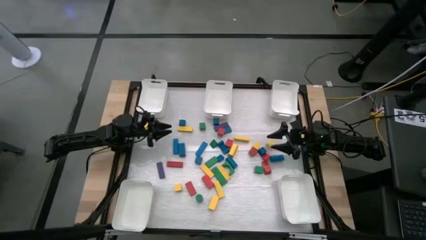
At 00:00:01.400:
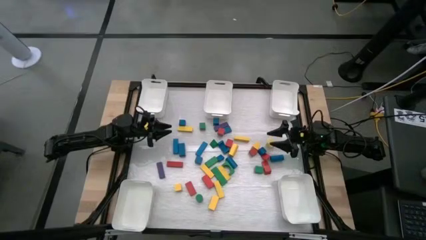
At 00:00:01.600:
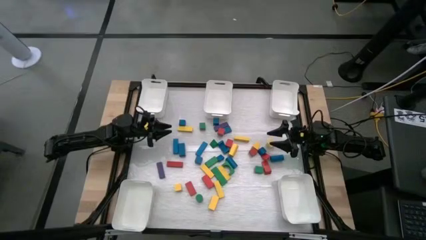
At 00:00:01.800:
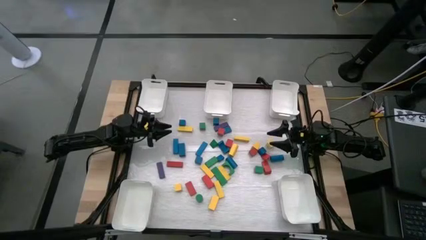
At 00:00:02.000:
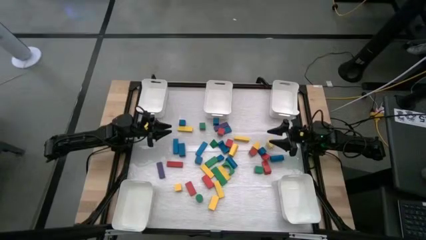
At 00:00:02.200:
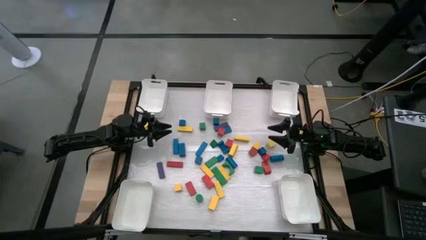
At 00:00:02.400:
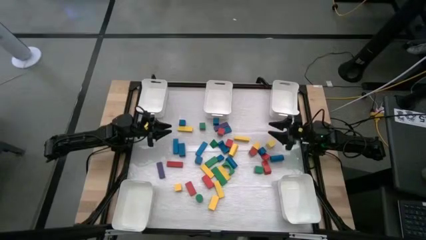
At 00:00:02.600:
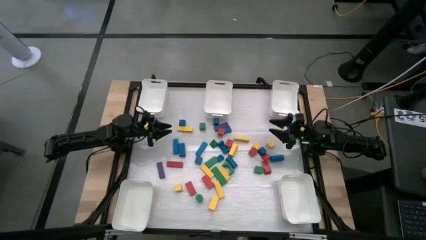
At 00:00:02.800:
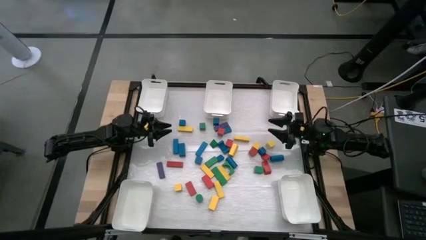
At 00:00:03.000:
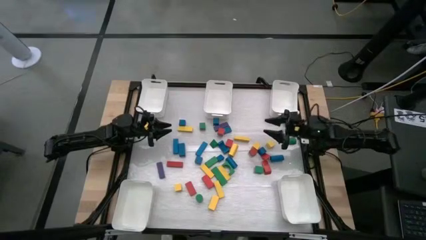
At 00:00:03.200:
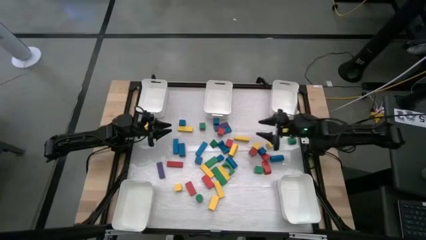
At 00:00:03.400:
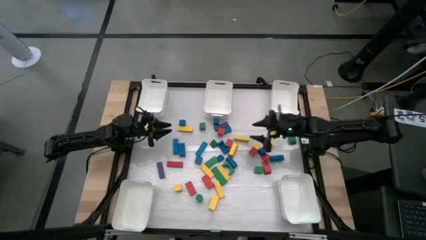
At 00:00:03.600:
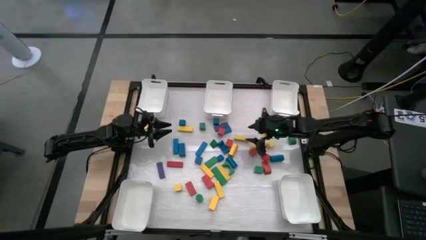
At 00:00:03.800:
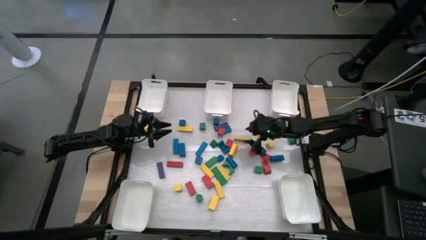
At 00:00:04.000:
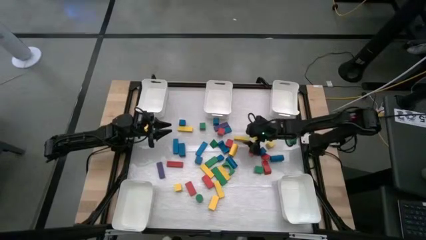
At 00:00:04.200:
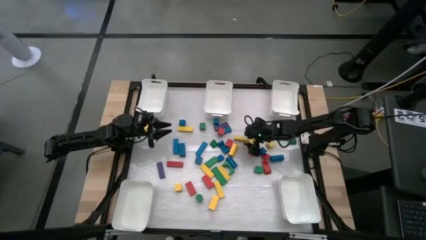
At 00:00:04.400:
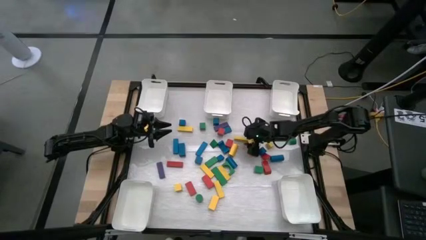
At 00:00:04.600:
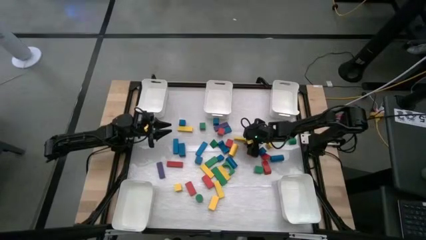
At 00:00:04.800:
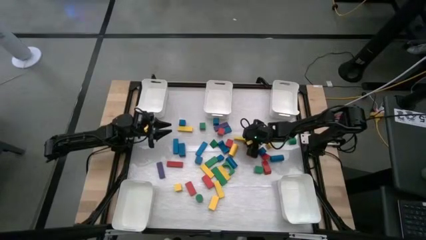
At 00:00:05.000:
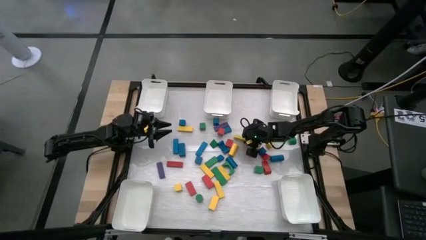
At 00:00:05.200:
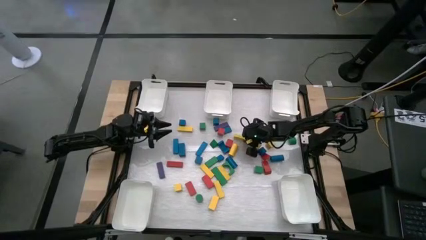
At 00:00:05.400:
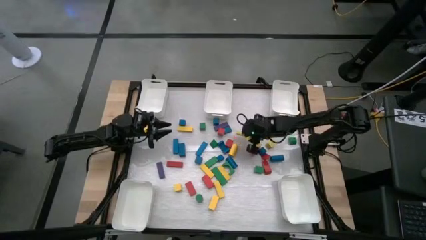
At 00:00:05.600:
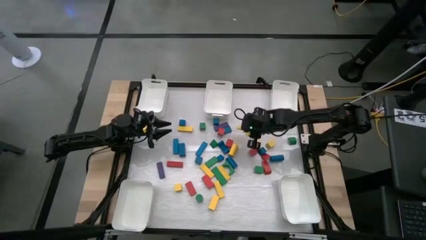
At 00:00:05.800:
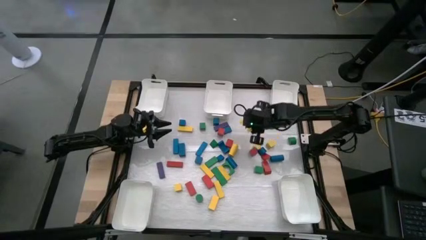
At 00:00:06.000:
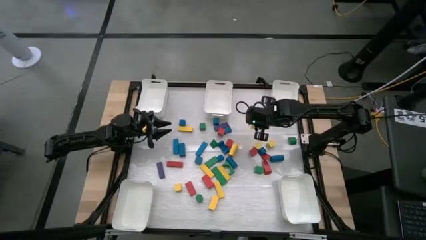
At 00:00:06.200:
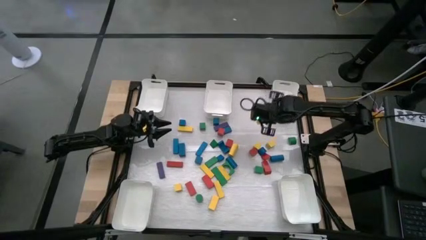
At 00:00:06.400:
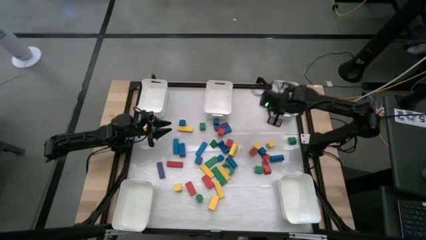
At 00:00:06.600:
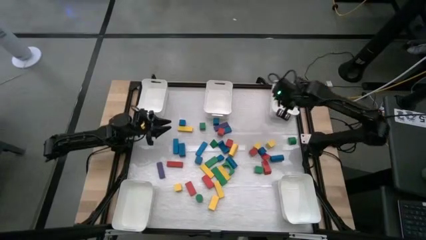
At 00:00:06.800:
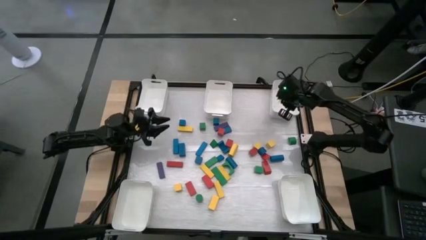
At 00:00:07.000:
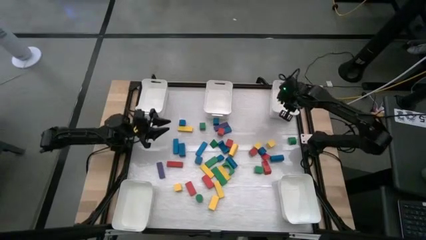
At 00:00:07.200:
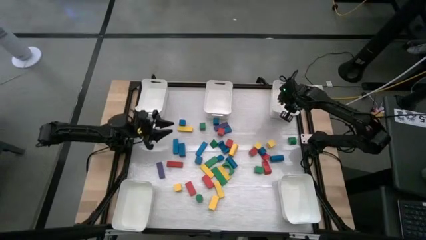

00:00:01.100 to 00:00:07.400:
Task: Sort blocks
Put the yellow block into the top right white bin

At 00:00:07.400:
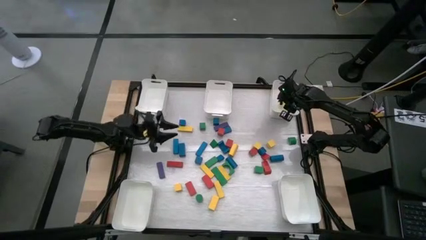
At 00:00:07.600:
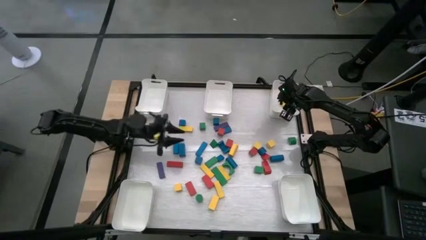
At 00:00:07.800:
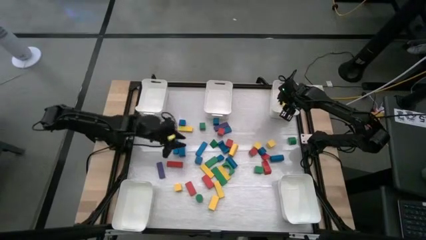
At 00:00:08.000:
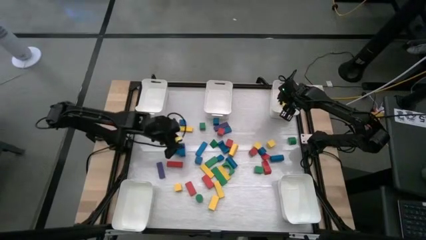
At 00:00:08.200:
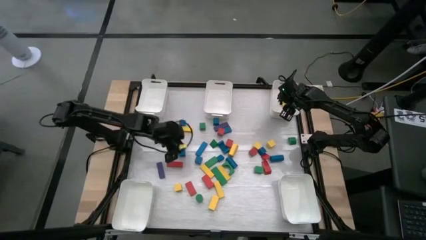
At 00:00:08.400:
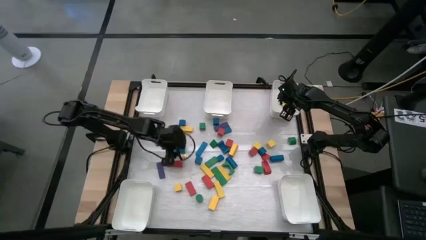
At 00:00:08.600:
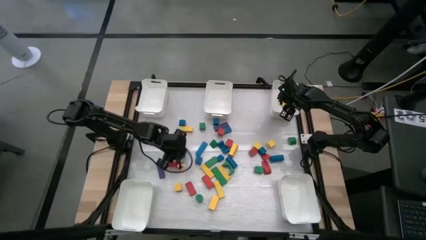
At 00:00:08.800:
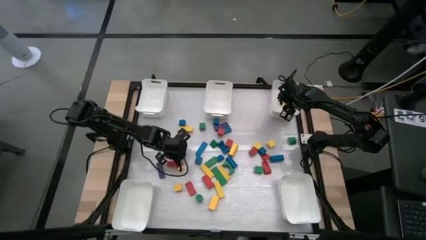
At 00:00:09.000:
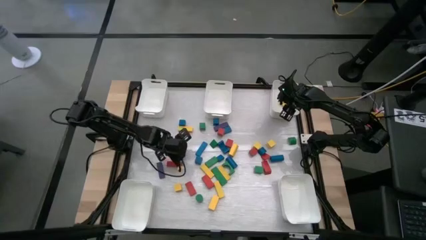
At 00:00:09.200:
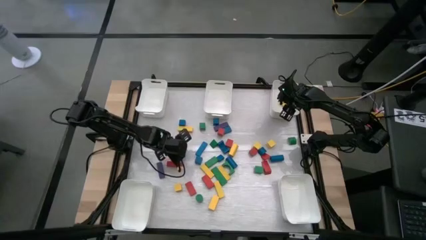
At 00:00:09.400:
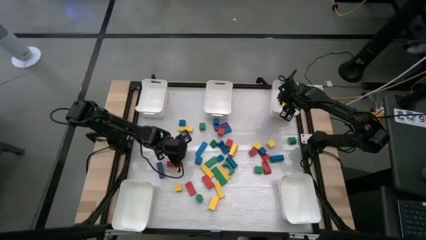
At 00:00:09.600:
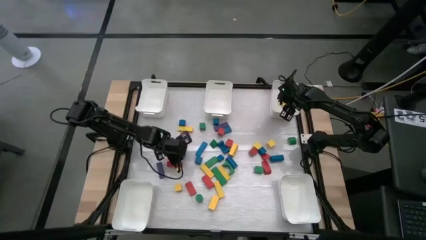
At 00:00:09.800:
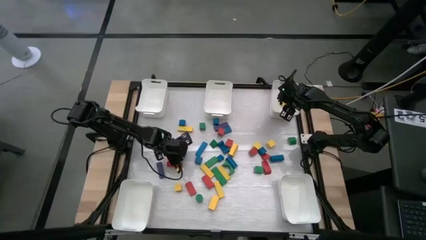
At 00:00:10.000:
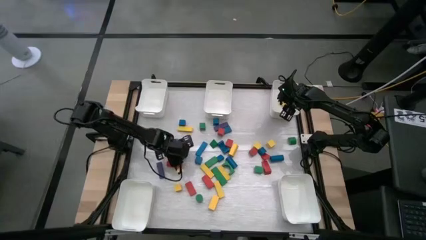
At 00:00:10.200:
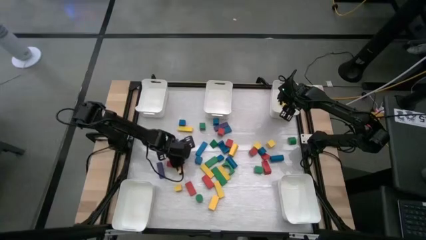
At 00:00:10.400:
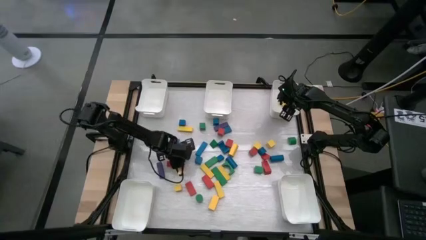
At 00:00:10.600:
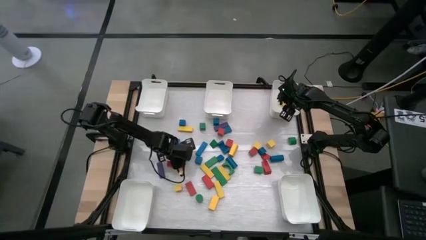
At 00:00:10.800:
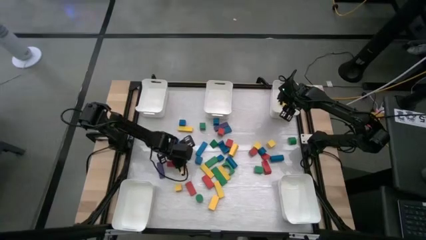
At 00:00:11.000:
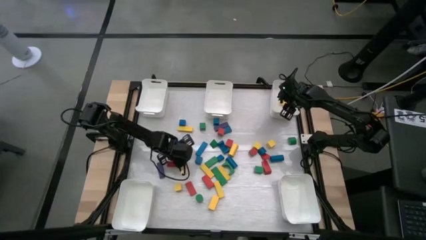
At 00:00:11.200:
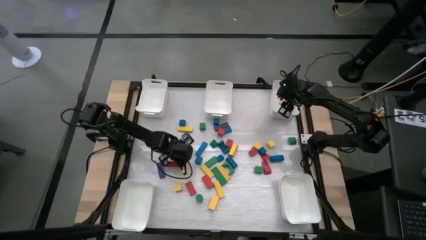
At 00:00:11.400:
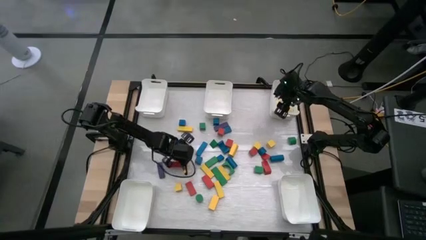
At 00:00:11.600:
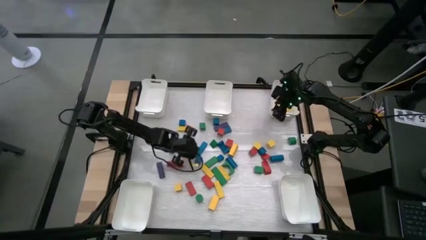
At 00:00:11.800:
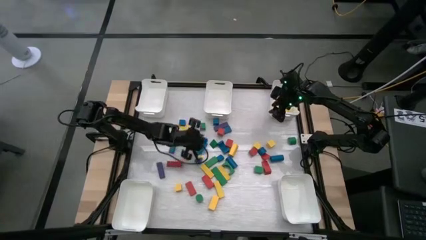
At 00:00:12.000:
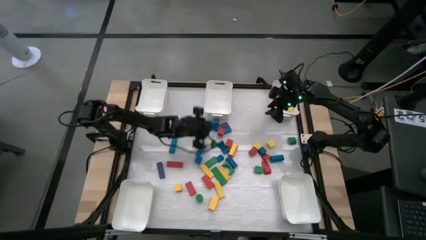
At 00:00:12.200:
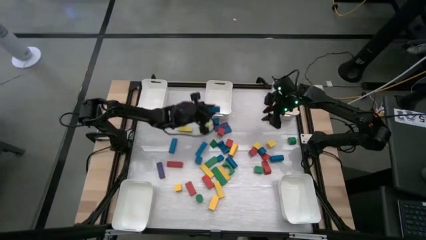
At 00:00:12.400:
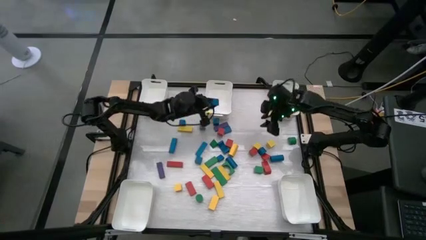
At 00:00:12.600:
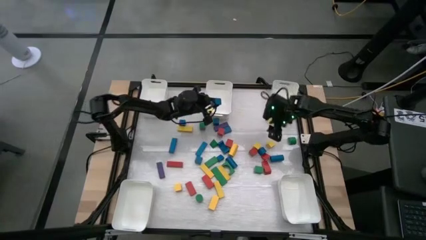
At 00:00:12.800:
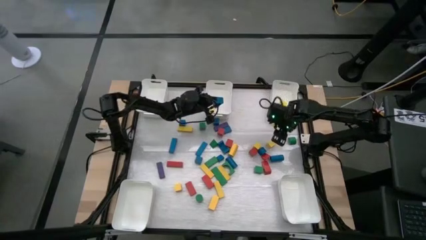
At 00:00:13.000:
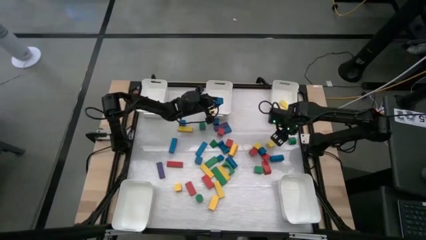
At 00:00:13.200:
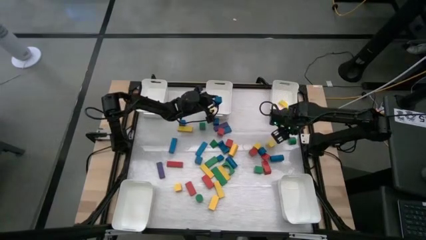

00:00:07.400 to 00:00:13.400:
Put the blue block into the top center white bin

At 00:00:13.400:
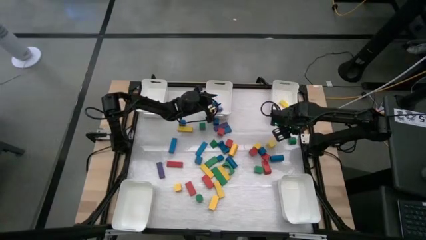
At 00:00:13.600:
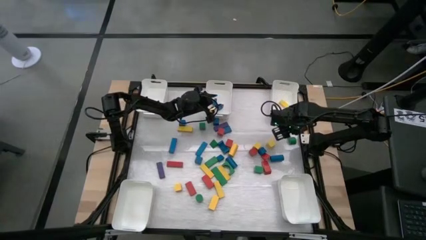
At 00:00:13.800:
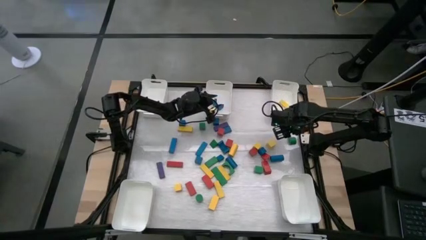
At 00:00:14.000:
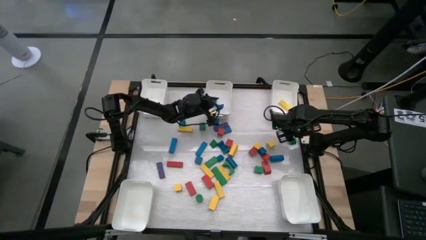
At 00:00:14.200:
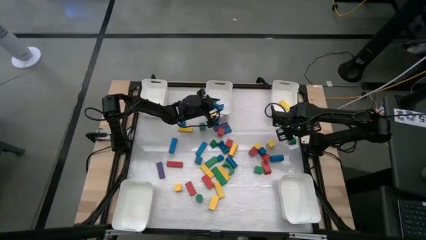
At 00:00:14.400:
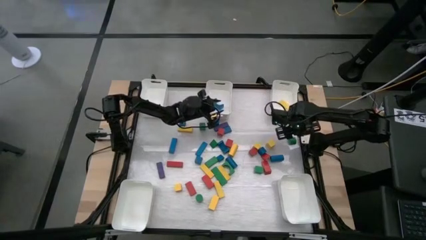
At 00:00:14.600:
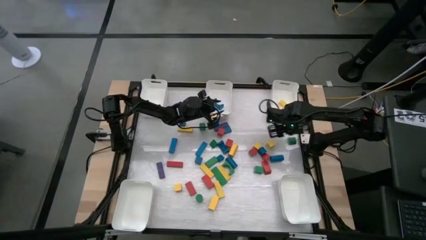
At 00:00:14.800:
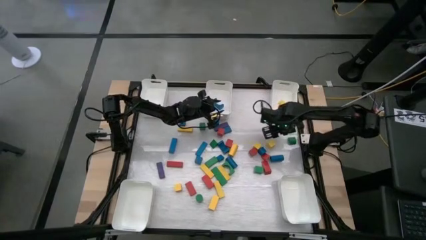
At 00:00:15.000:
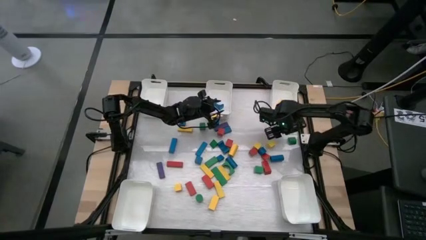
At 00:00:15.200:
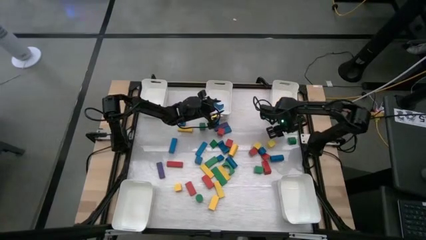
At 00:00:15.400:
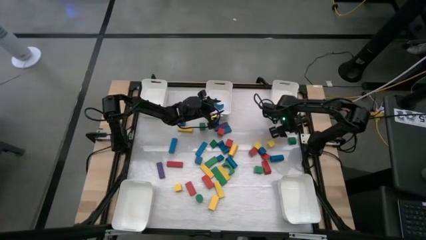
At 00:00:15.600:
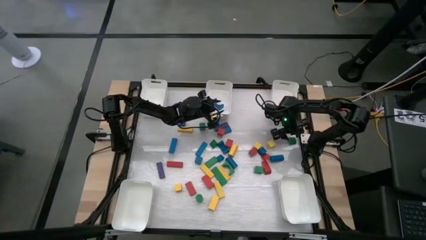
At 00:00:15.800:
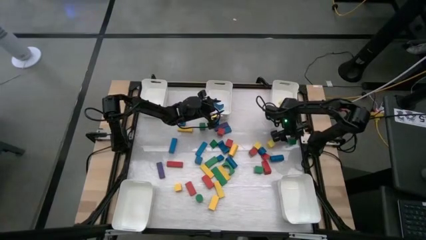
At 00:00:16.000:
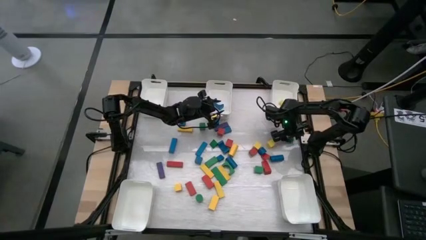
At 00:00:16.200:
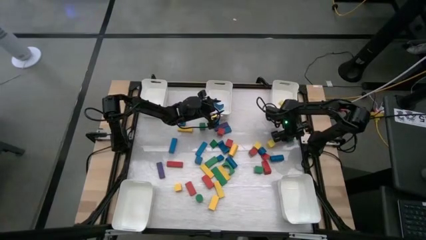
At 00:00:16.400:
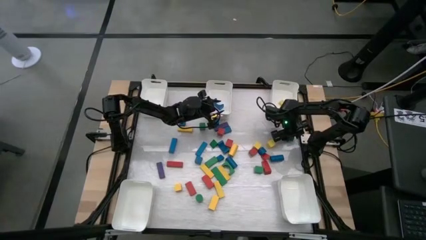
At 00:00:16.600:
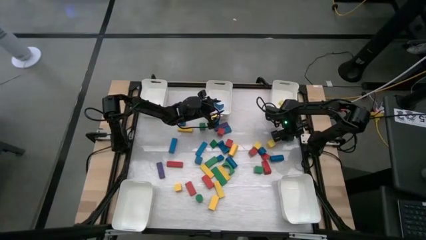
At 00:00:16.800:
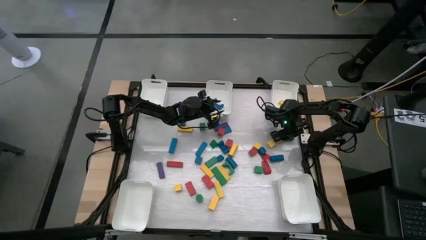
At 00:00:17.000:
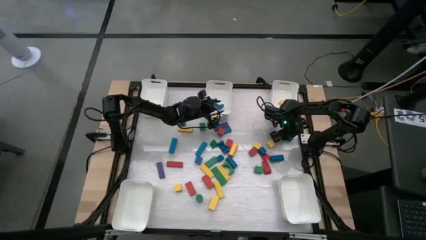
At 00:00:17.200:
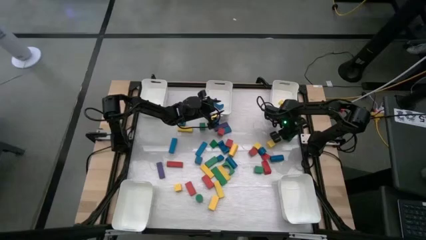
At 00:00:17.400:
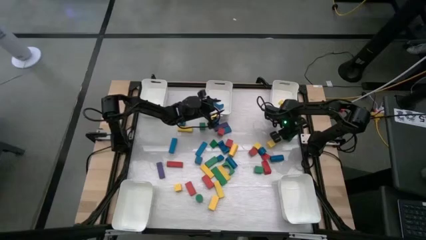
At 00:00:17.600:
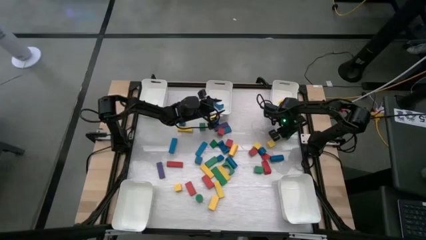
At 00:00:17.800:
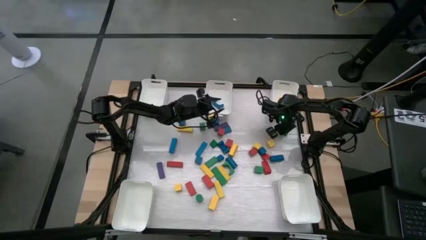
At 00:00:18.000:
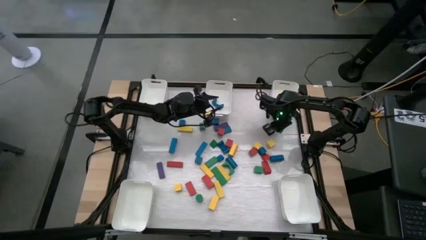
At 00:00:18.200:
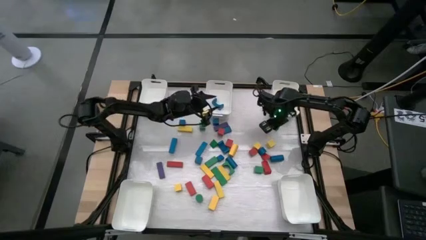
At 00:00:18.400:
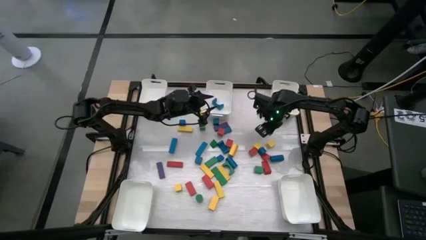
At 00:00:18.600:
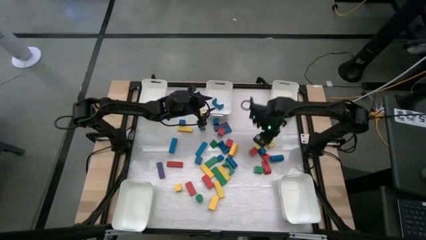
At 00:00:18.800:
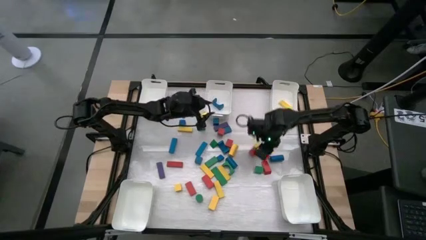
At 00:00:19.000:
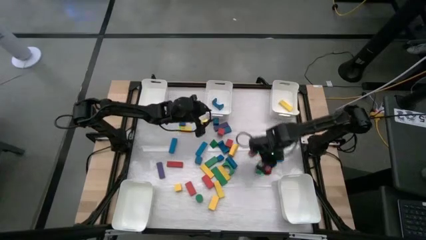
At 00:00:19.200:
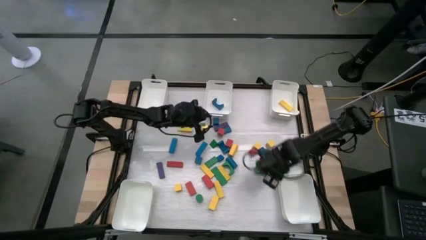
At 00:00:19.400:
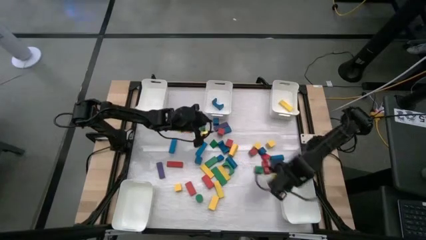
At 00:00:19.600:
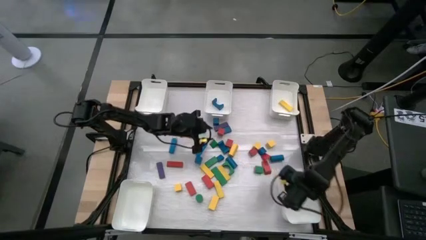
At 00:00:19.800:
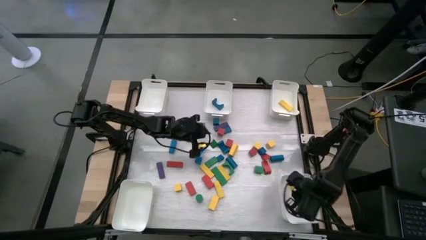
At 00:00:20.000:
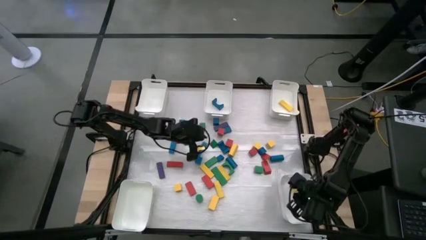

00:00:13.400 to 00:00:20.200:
Put the green block into the bottom right white bin
